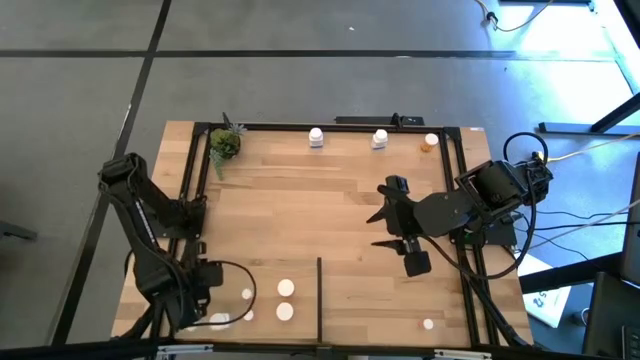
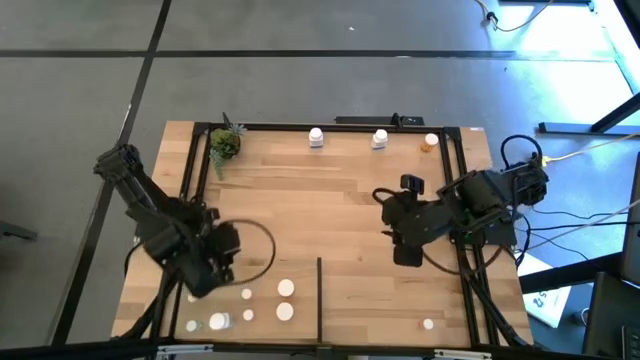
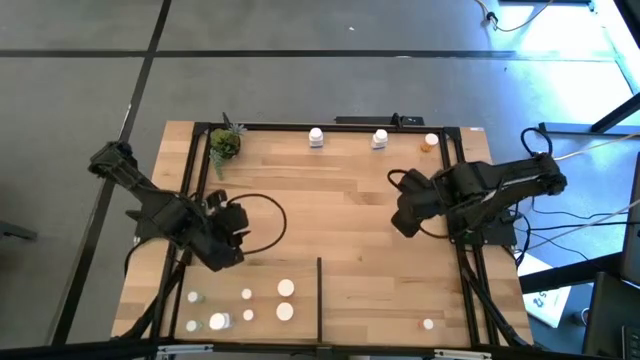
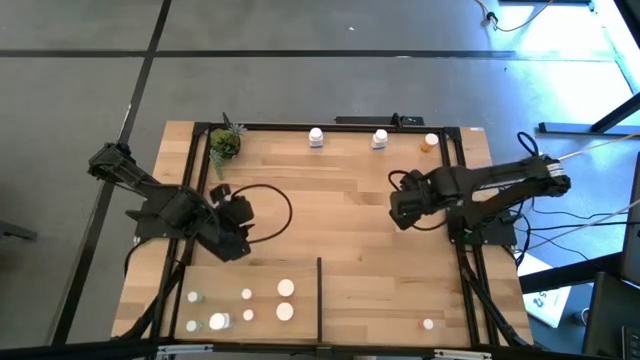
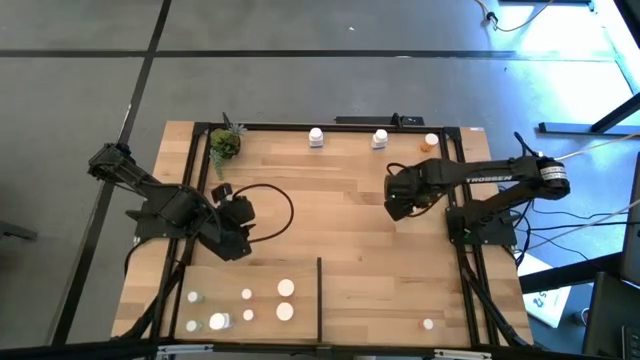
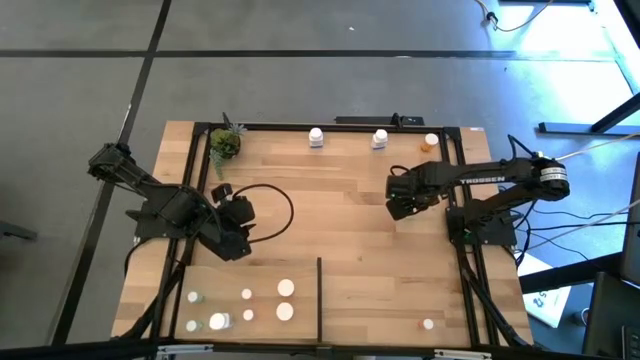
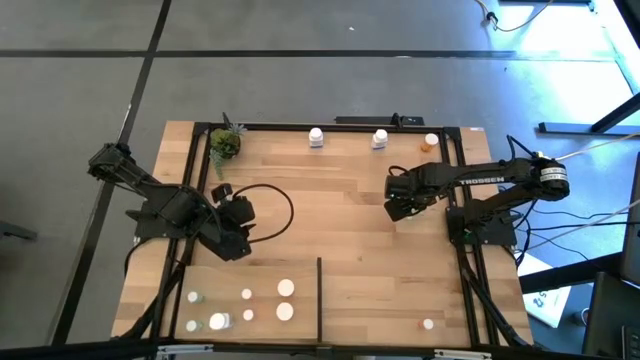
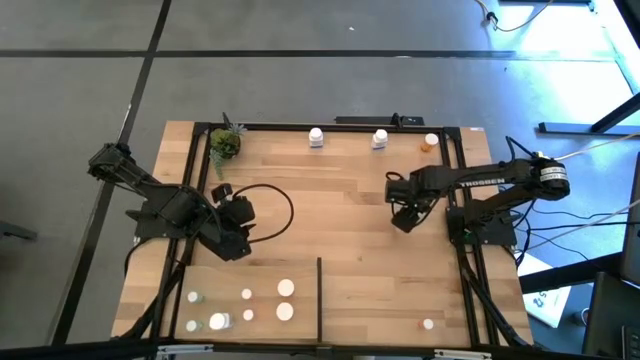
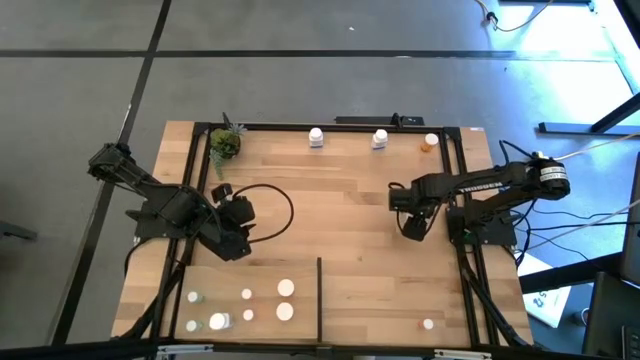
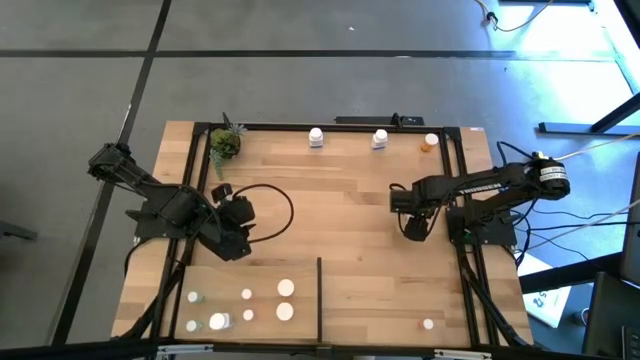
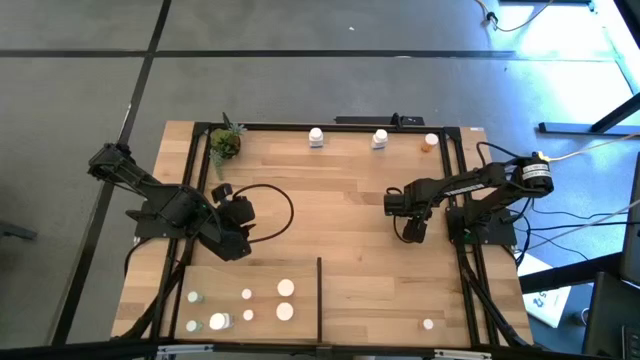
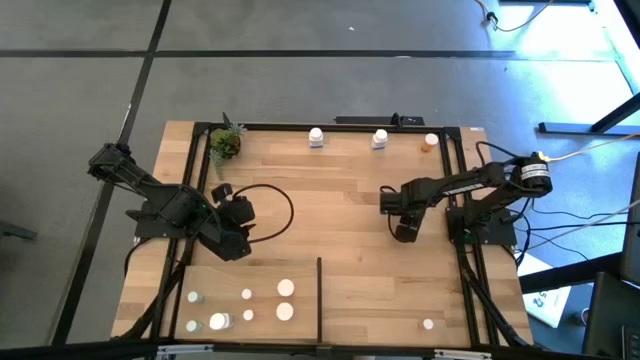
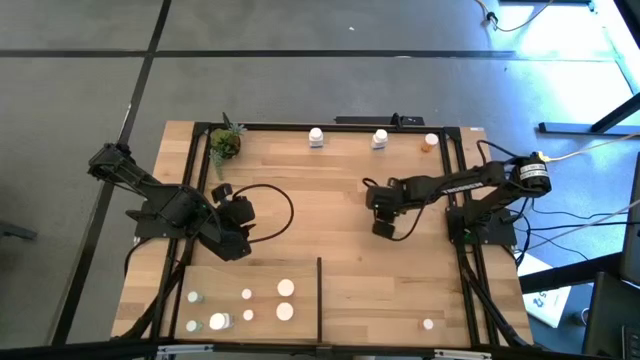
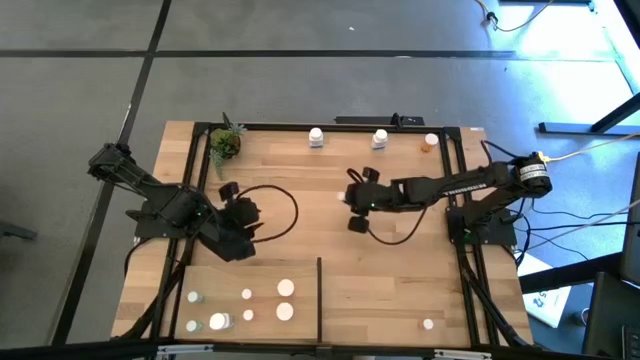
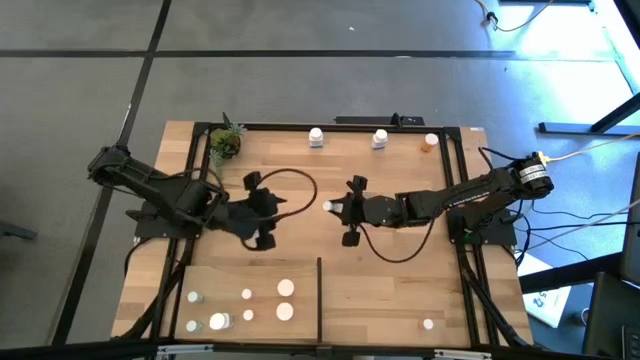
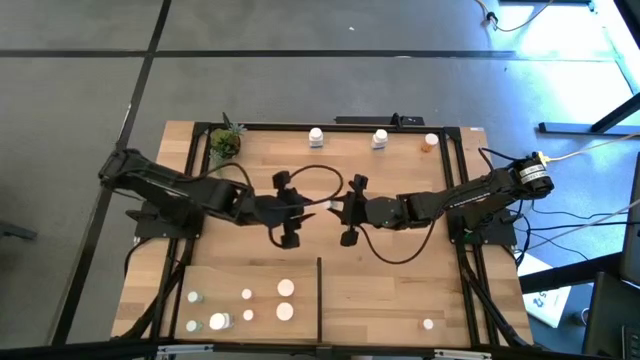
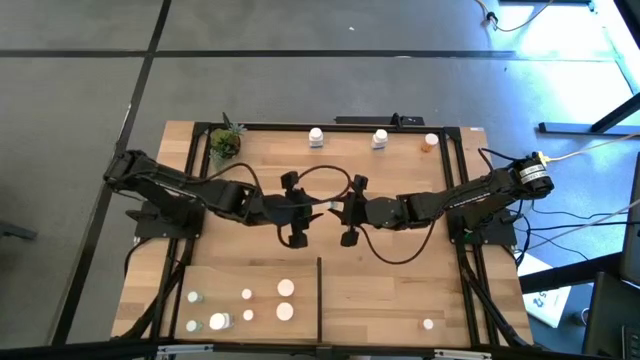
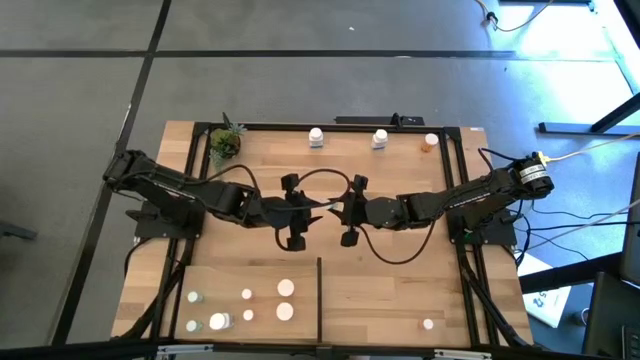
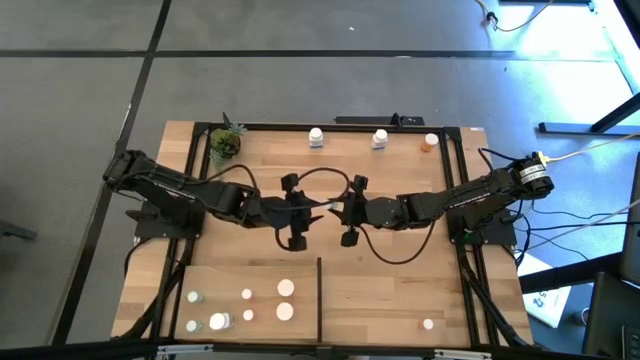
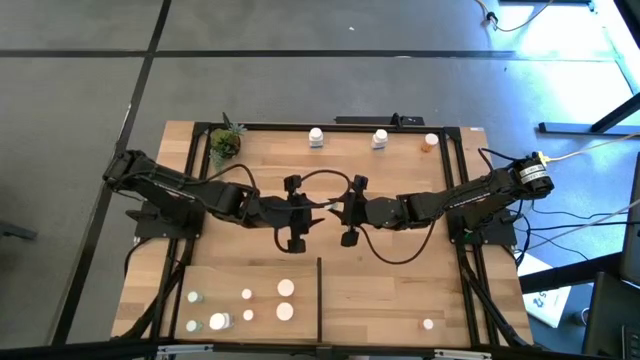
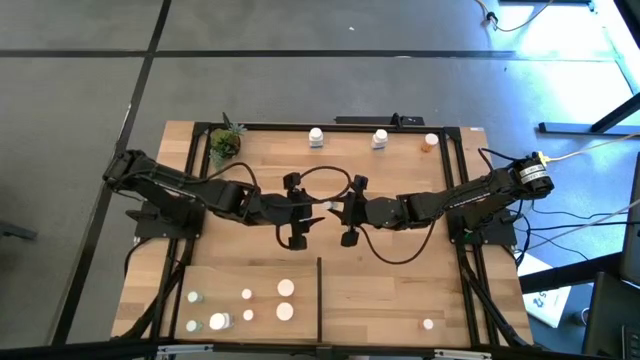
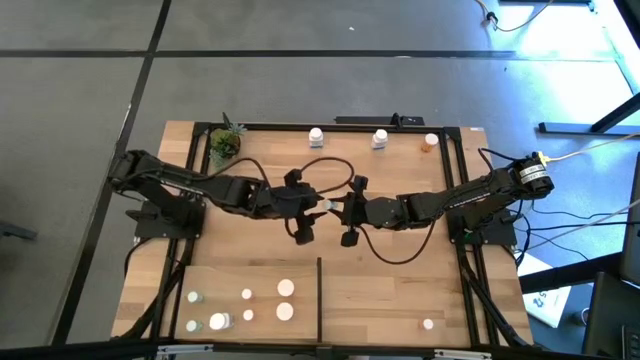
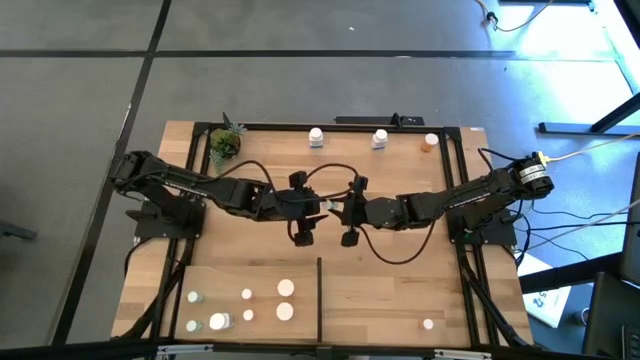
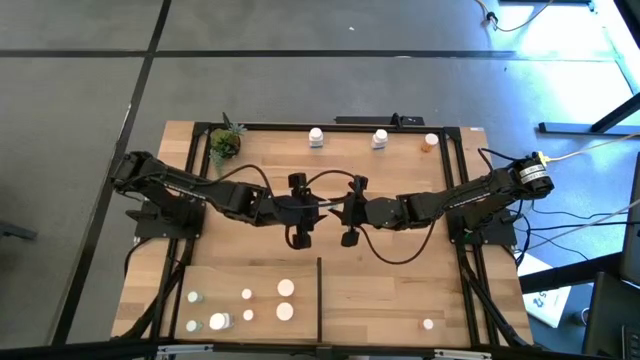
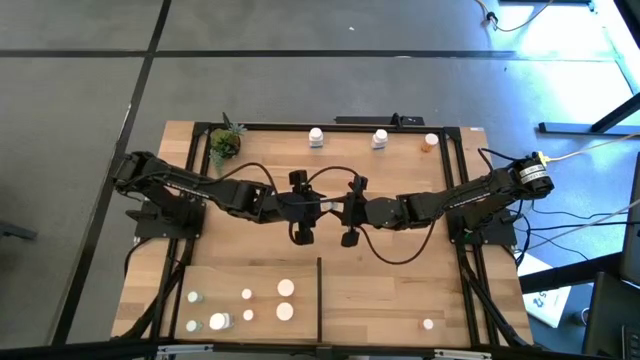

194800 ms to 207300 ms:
Task: Pick and place medicine bottles onto shelf by color
Put the green pill bottle on the shelf aligned with the other green pill bottle

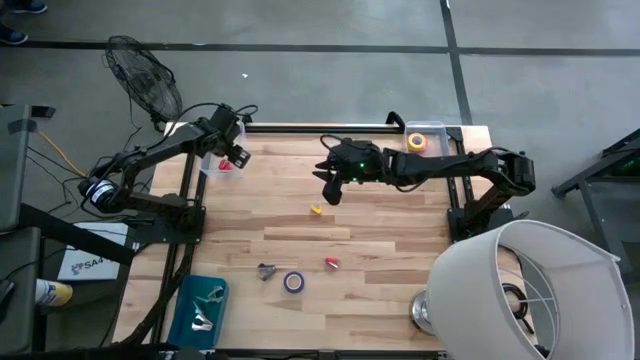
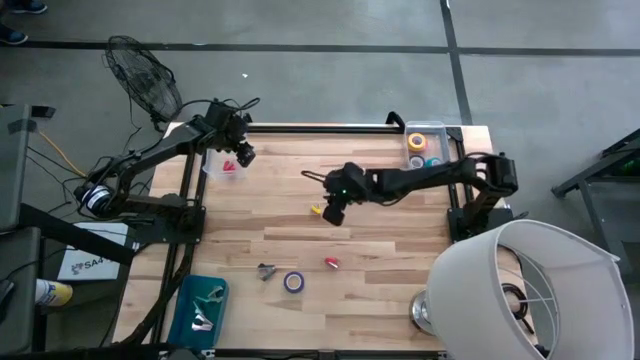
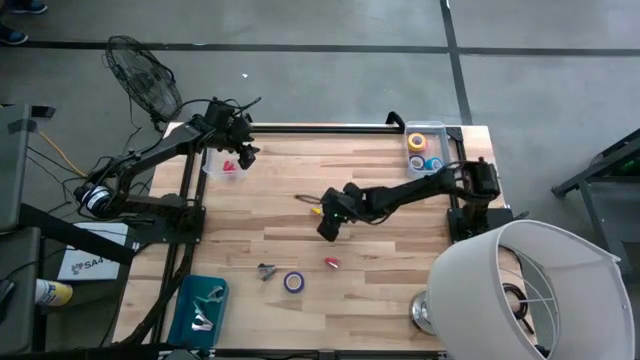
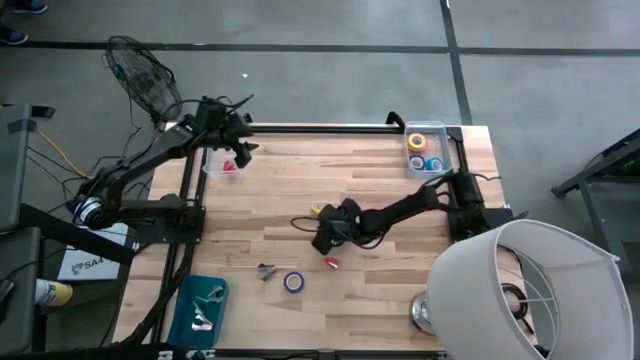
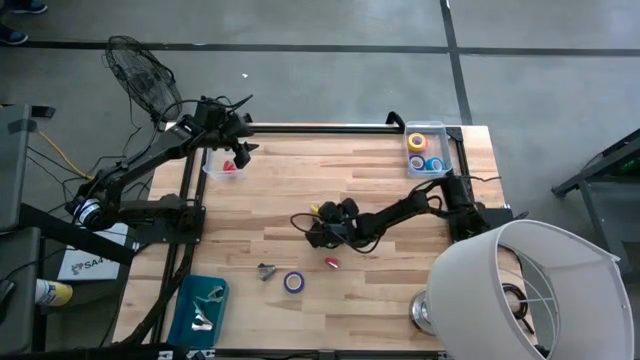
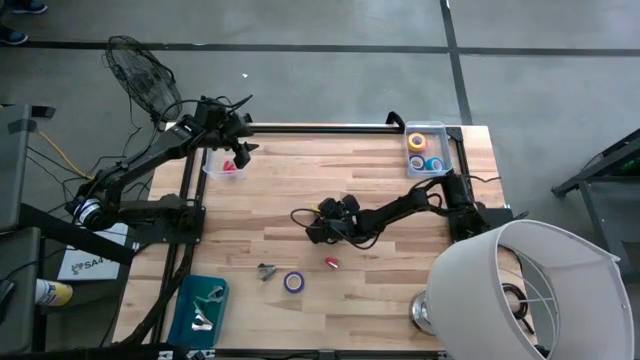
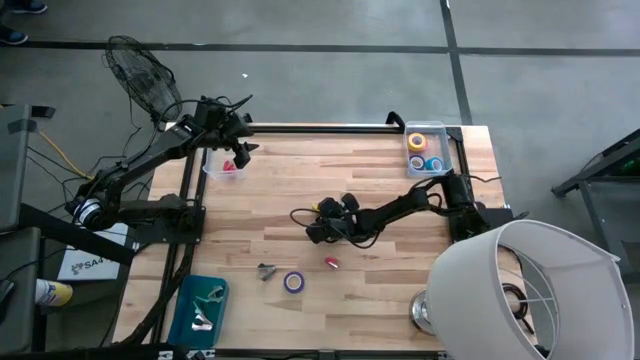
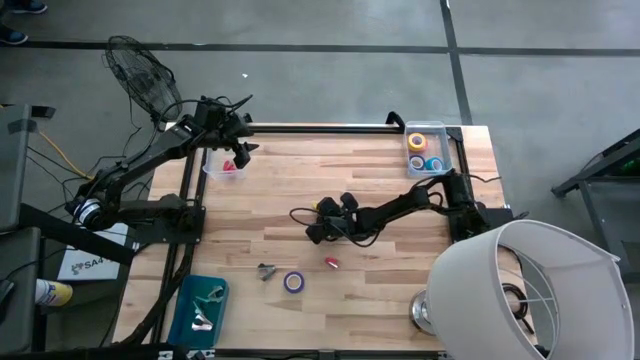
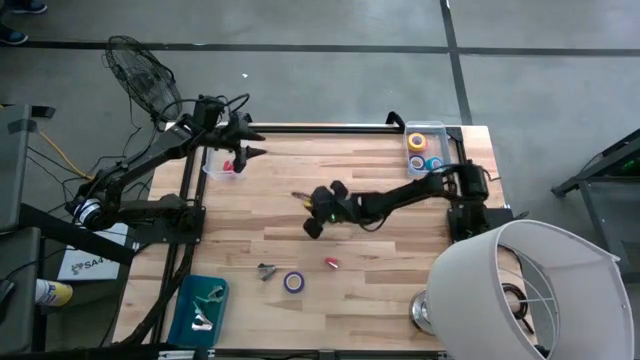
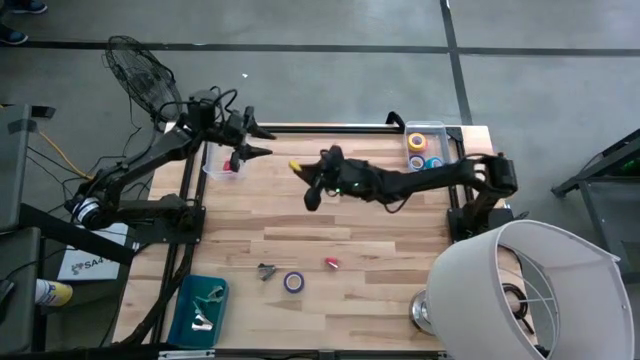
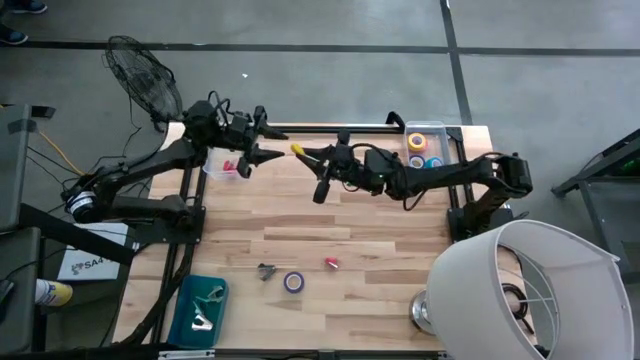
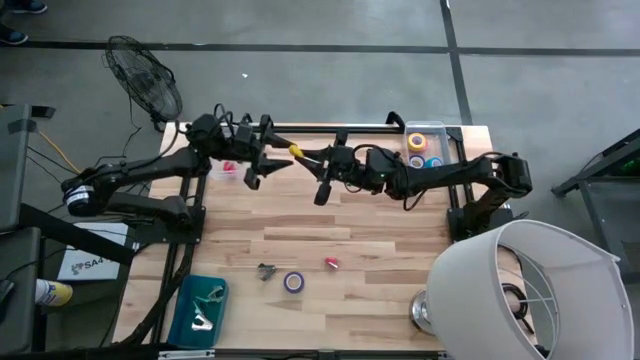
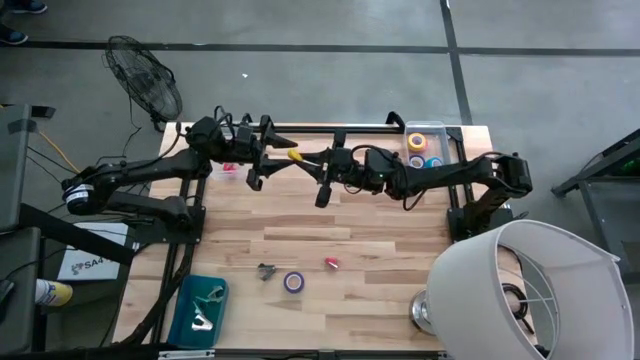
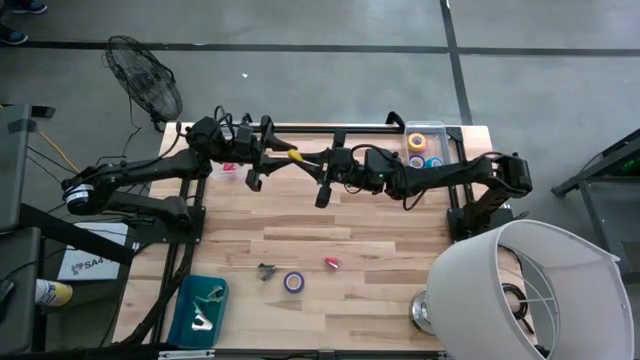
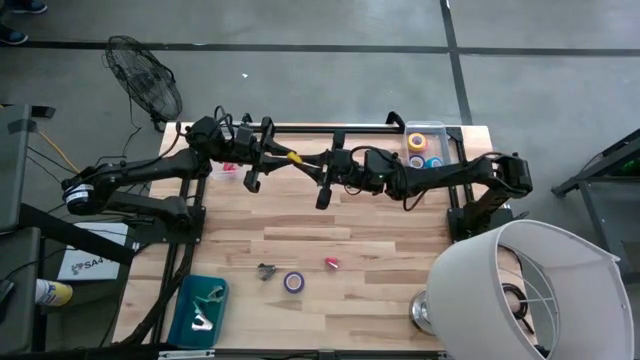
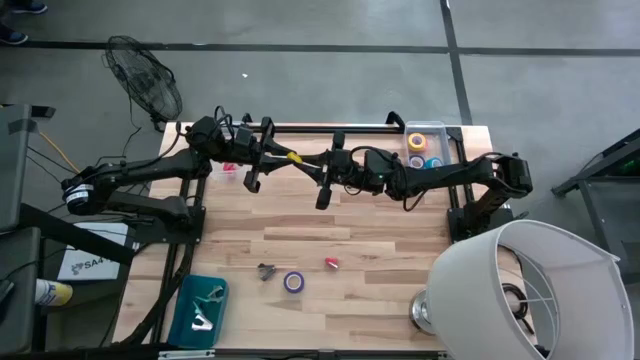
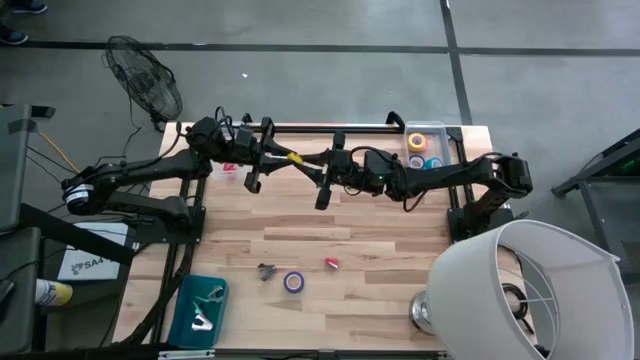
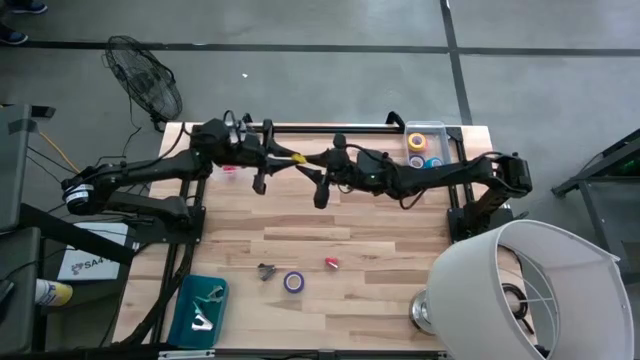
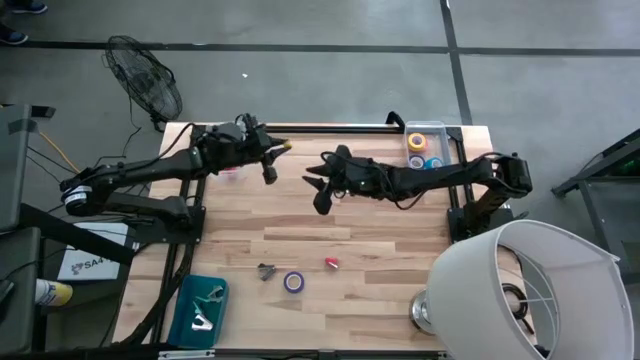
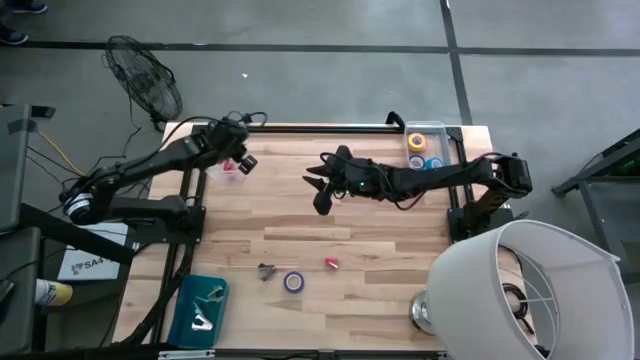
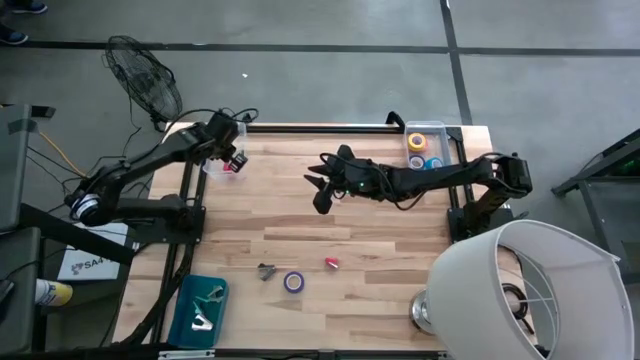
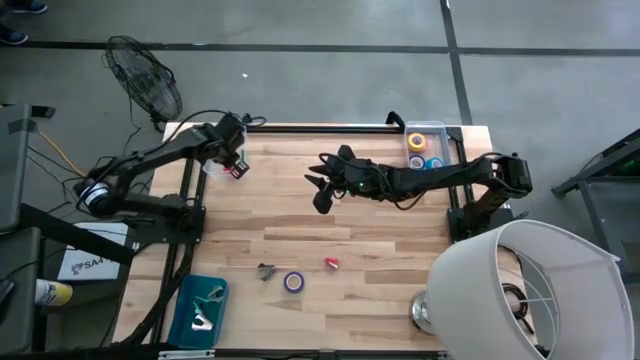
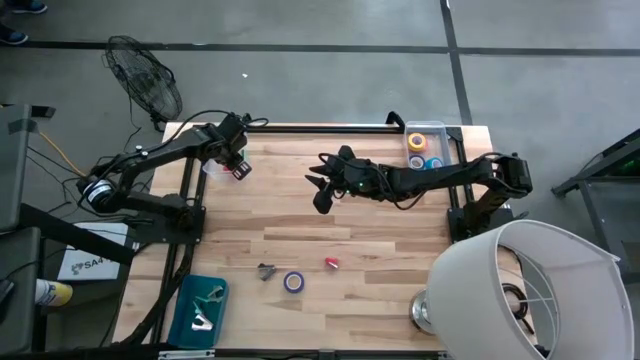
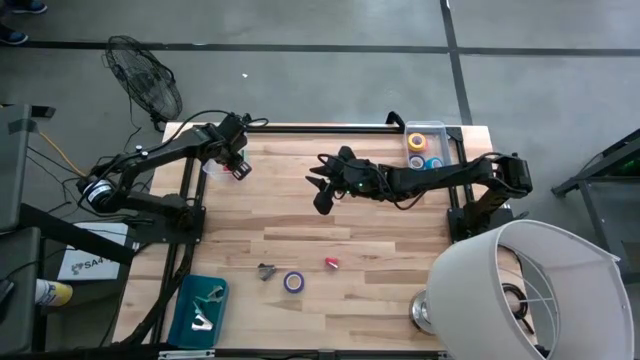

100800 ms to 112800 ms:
Task: Pick and place Stapler, Stapler remover, tape
Put the yellow stapler into the left transparent bin
